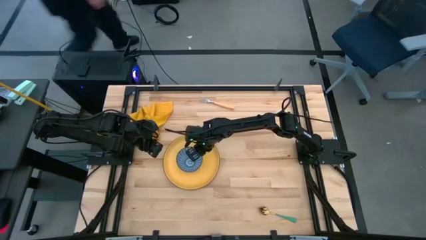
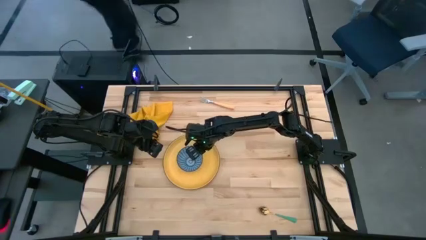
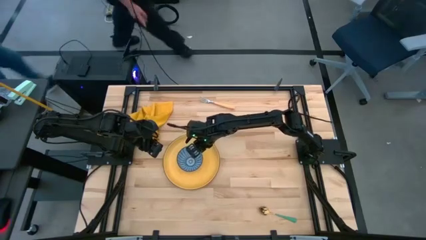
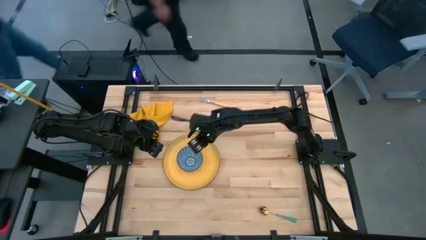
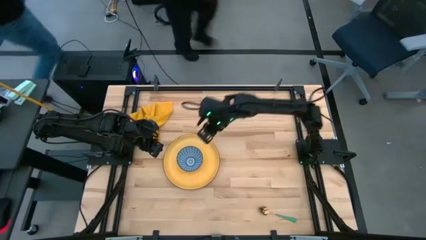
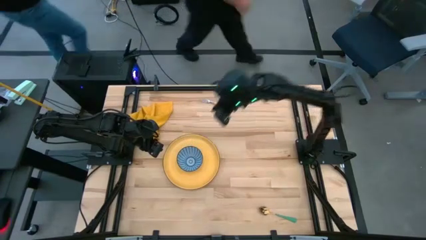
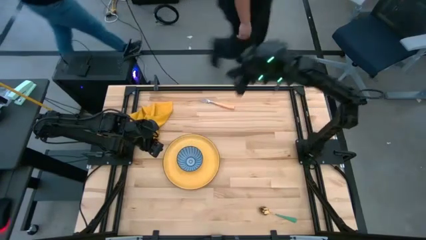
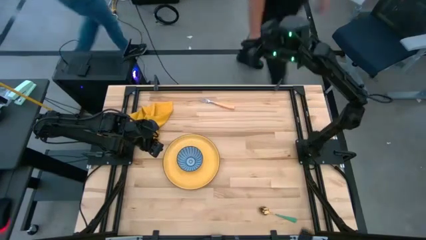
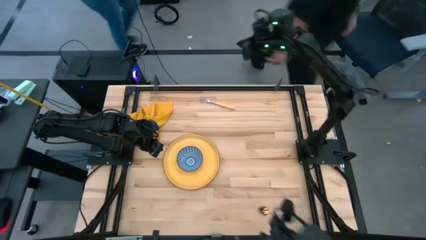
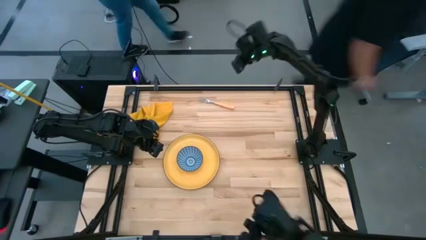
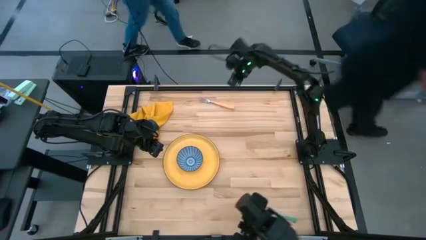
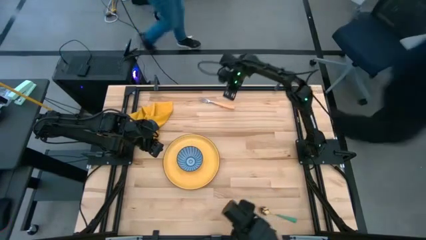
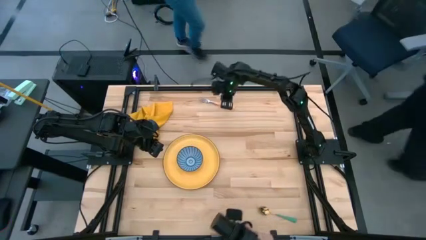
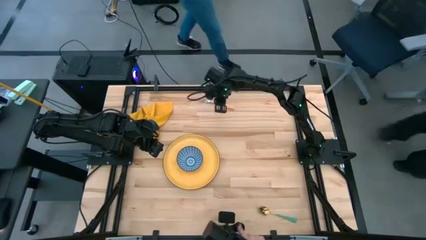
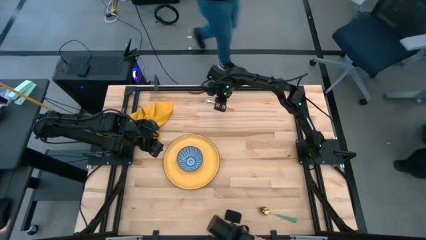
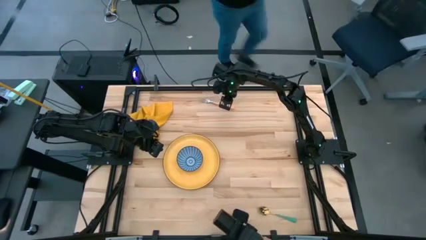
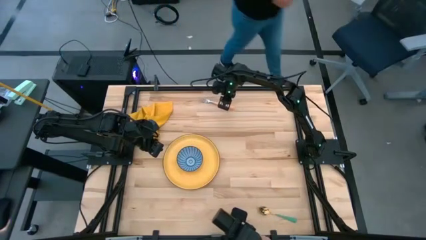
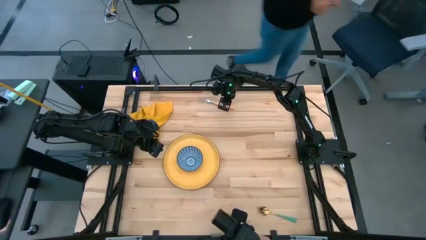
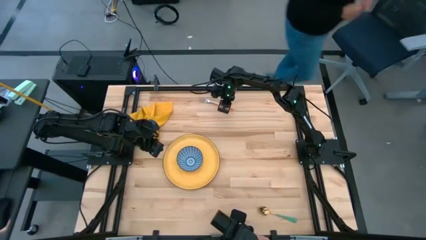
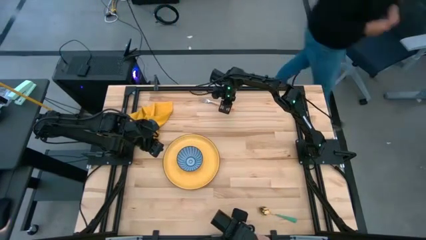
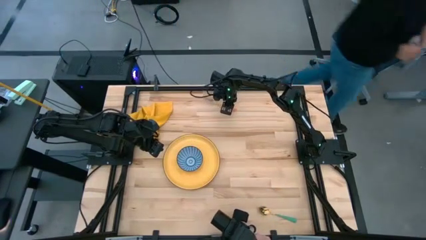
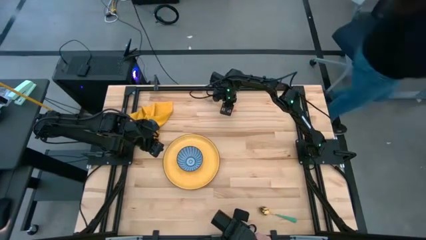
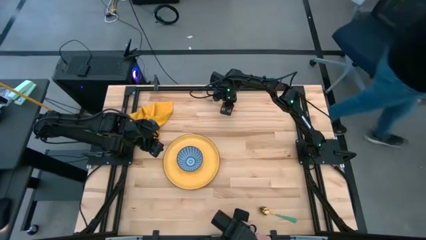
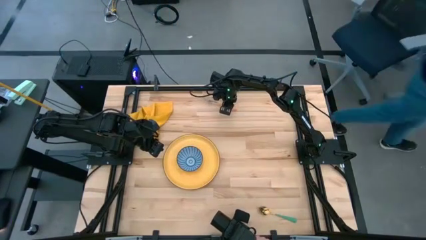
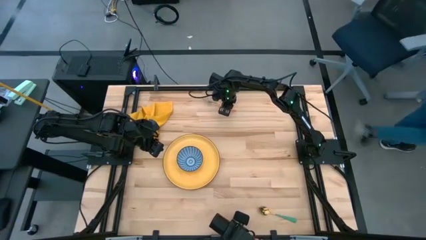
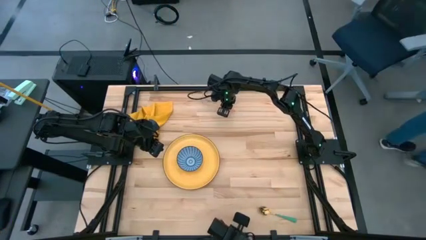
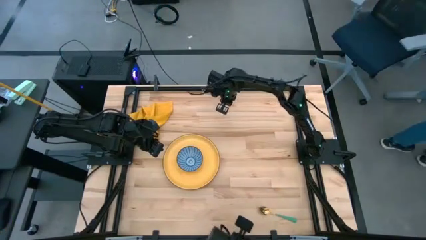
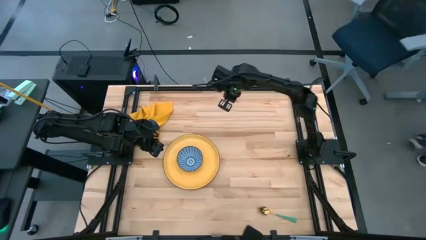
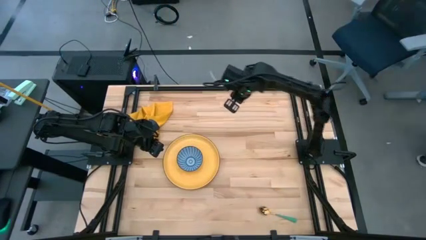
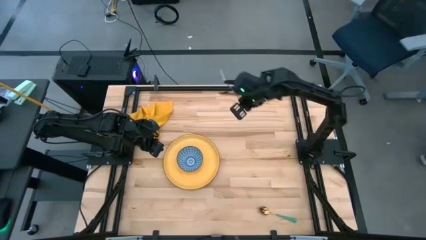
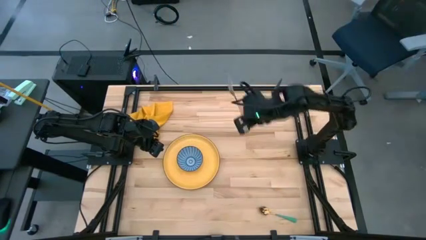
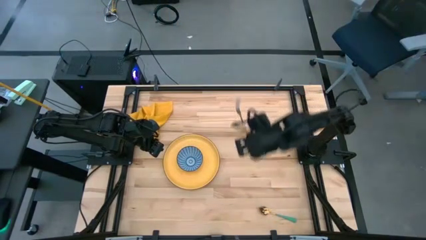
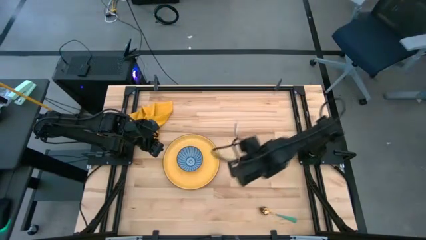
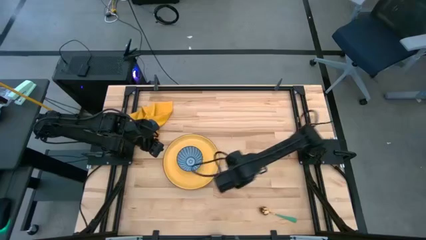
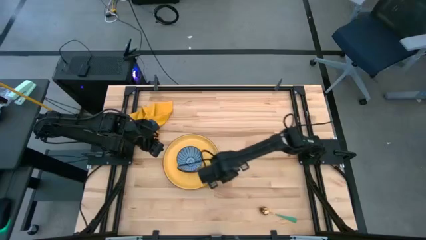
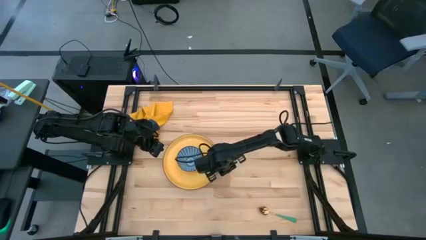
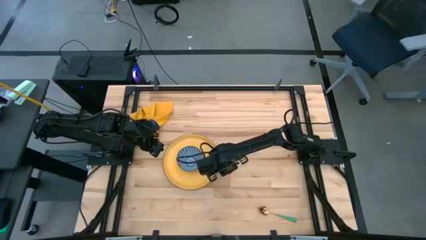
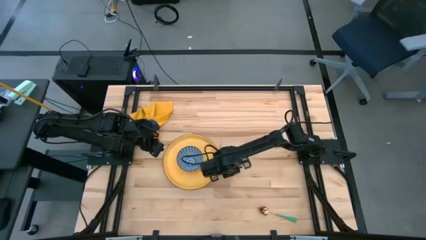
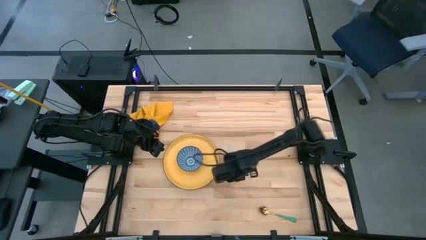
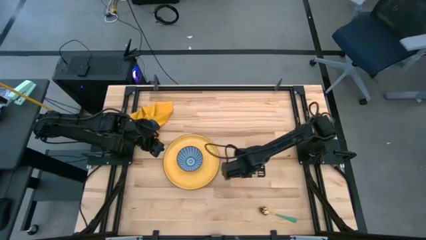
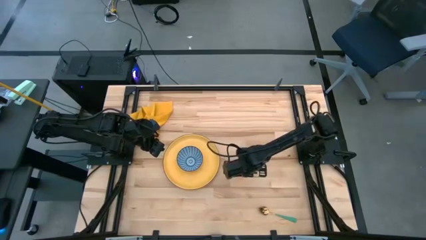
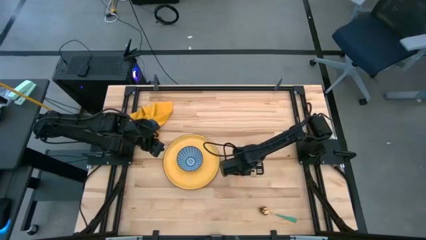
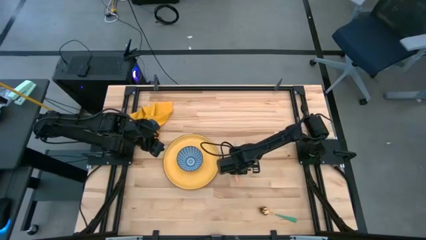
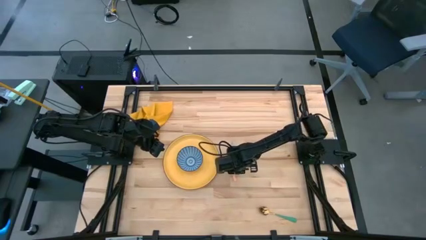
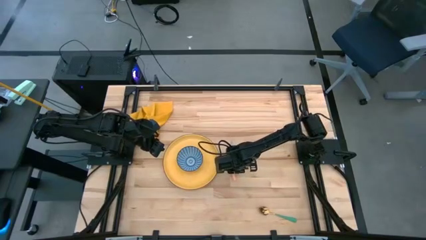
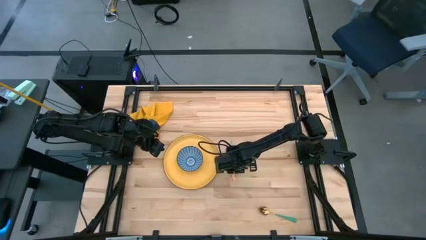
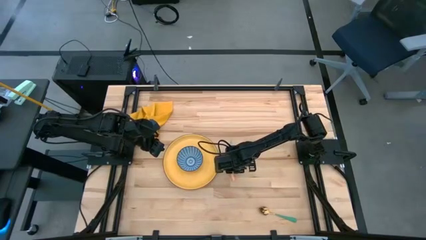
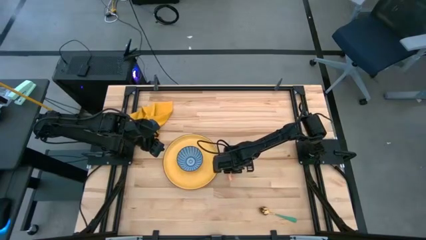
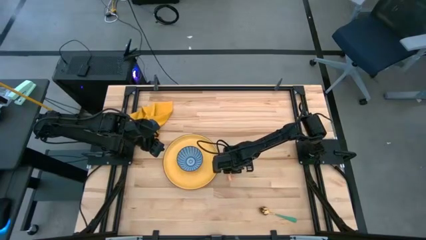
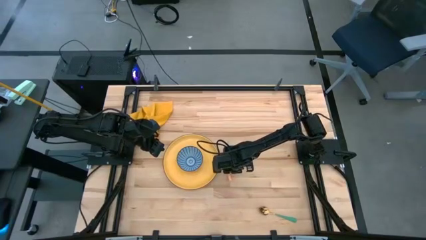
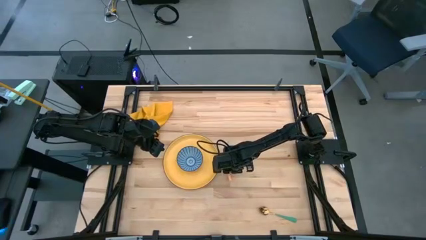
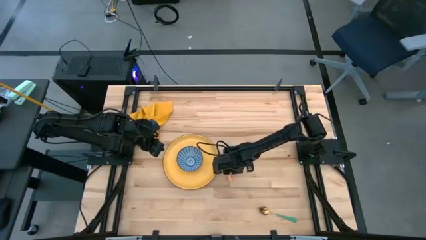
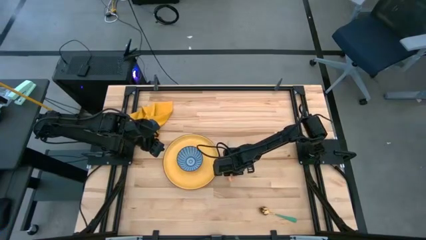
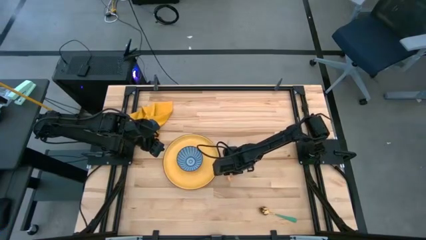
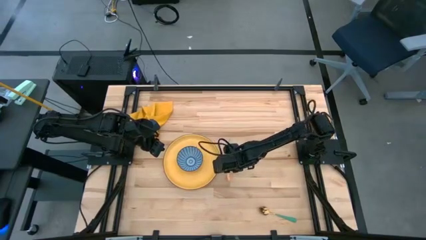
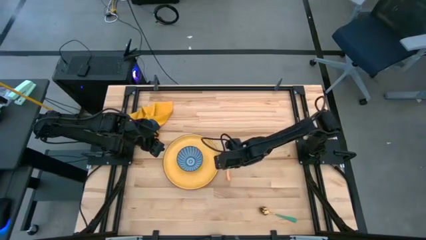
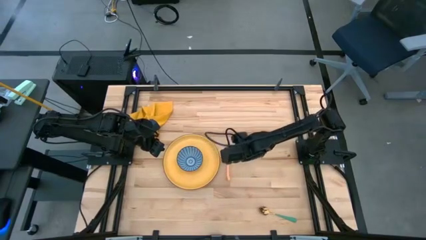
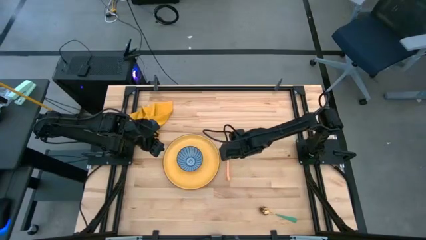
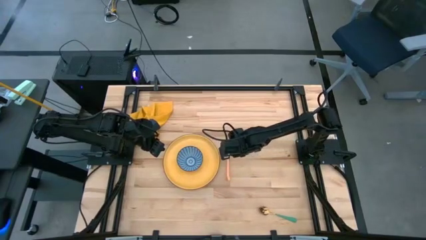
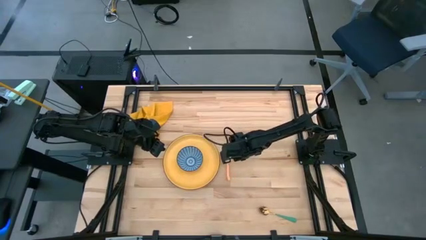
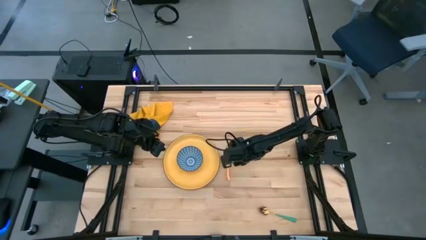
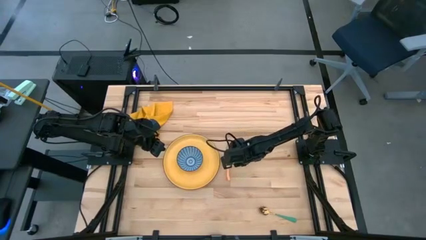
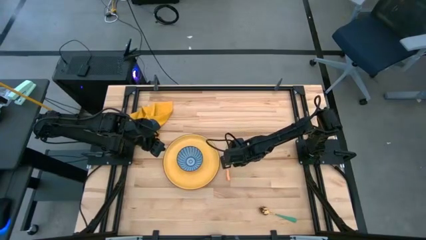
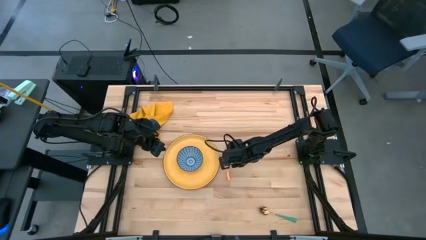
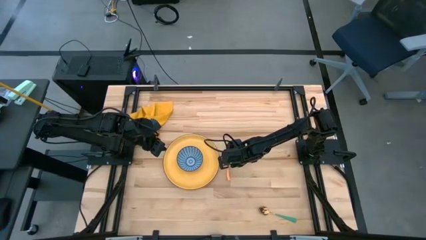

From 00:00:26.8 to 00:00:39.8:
Task: Set table place
Put the orange fork to the right side of the yellow plate
